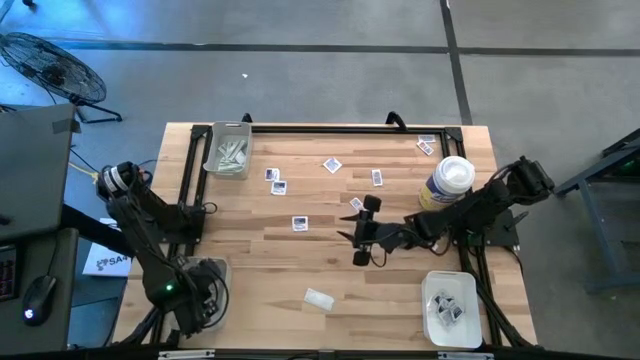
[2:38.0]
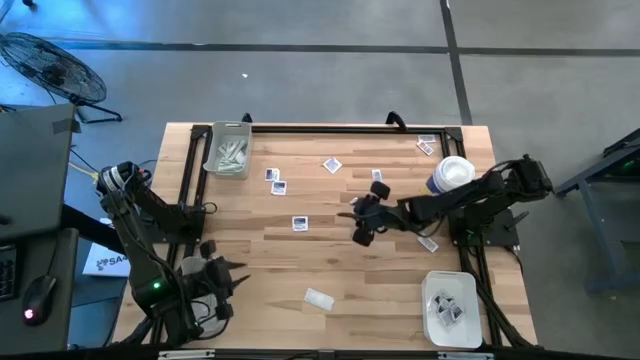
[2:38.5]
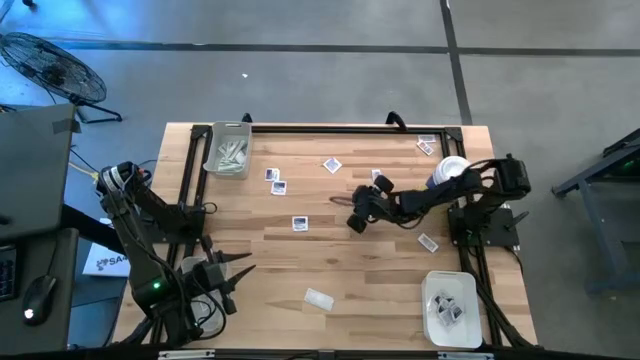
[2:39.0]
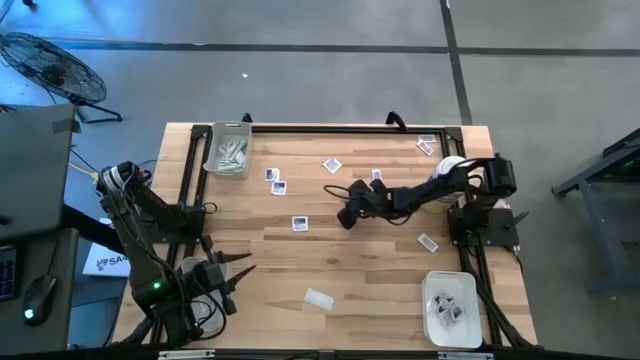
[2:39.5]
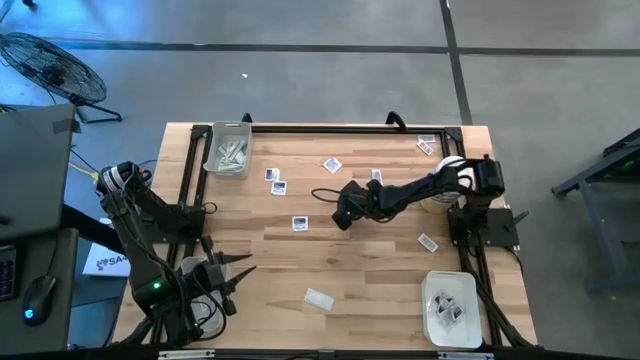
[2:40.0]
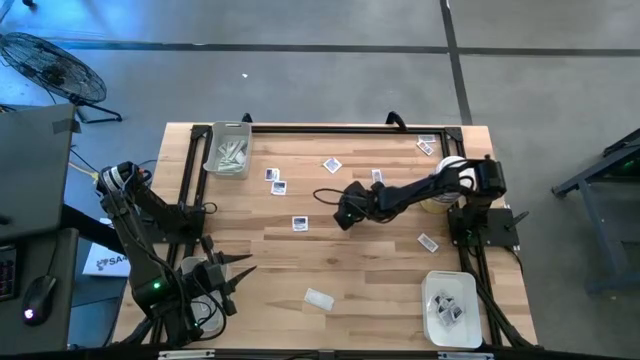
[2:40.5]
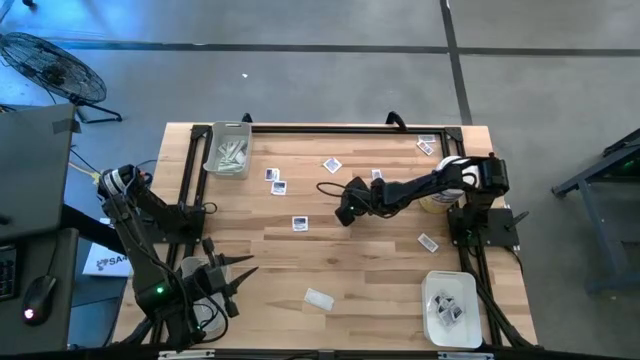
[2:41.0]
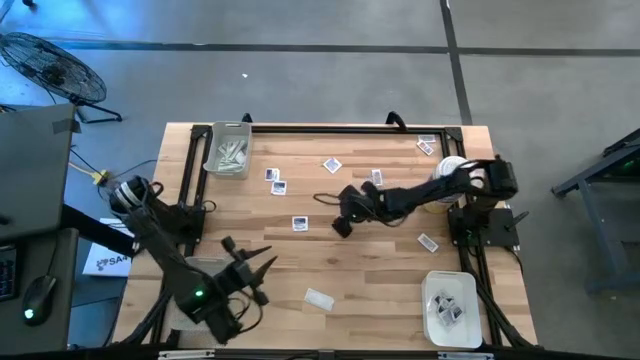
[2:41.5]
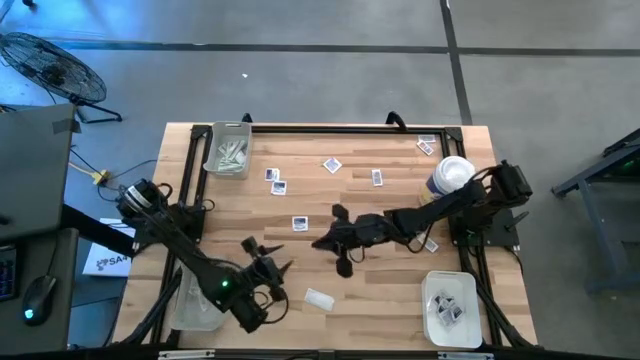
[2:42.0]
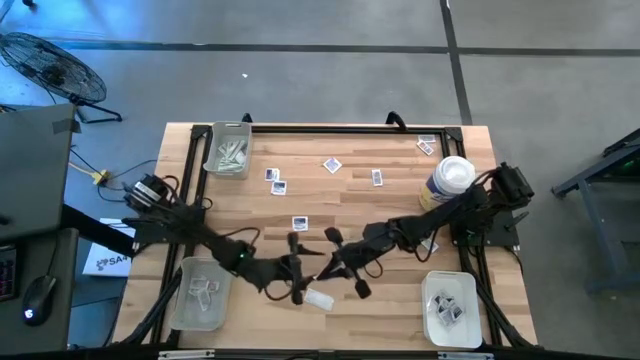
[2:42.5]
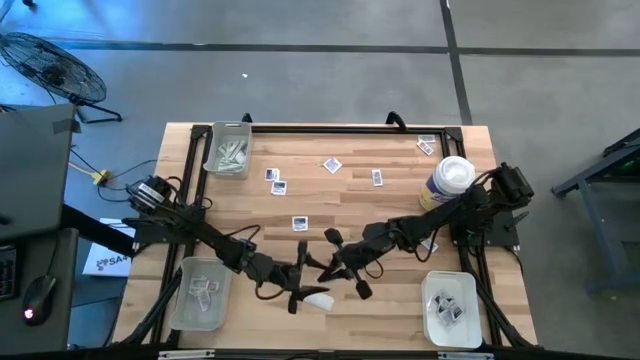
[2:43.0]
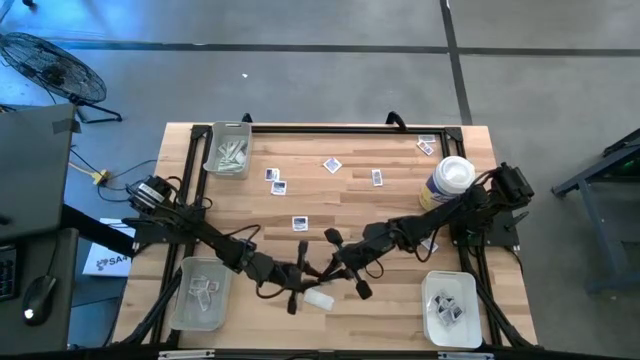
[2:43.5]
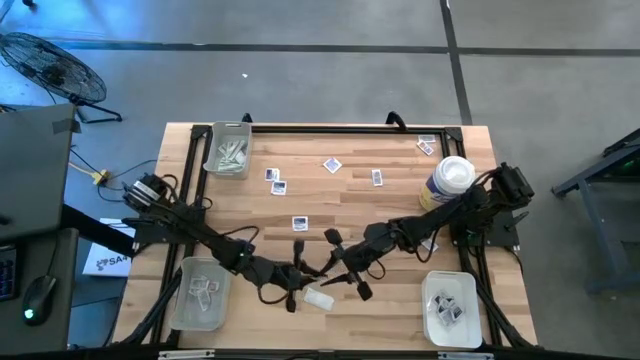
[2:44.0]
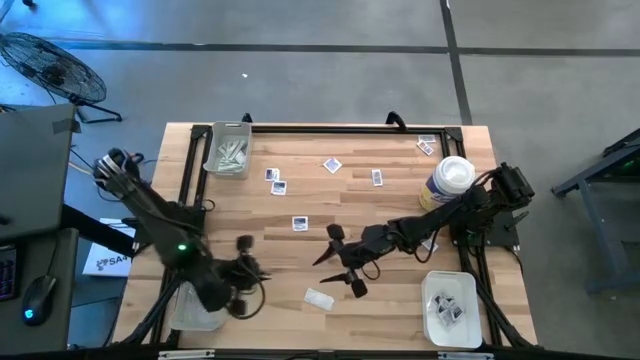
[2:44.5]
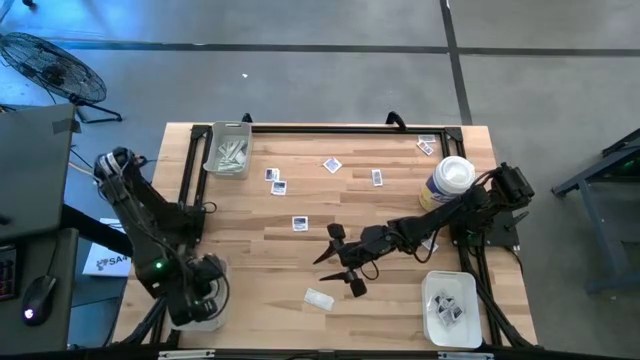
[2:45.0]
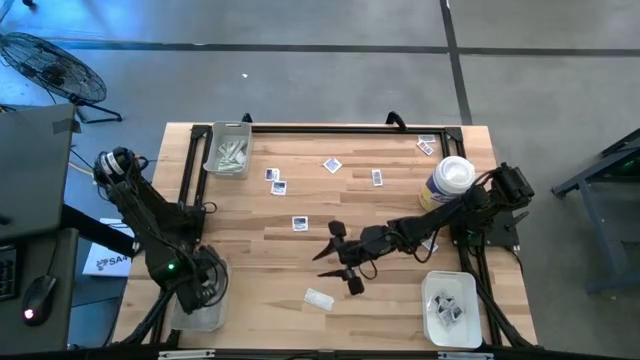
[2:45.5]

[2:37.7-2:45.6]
Task: Pick & Place First Aid Supplies
Put the orange ointment pack into the bottom gray bin

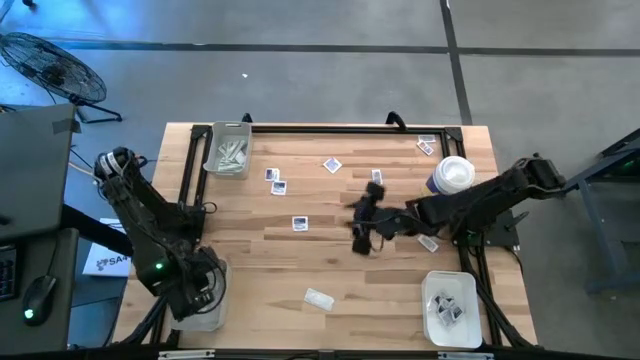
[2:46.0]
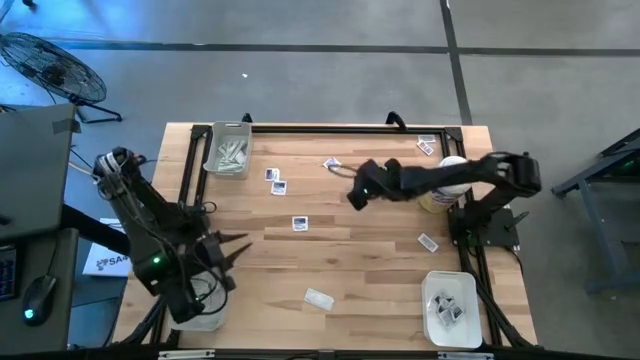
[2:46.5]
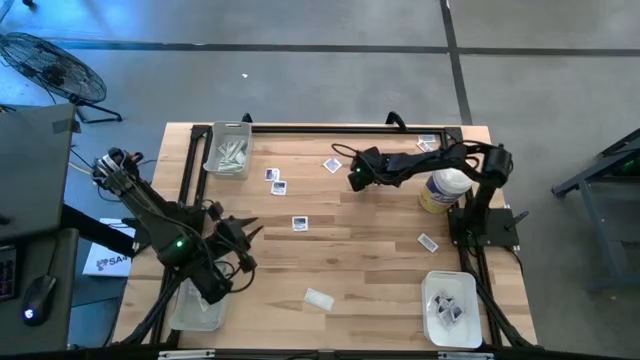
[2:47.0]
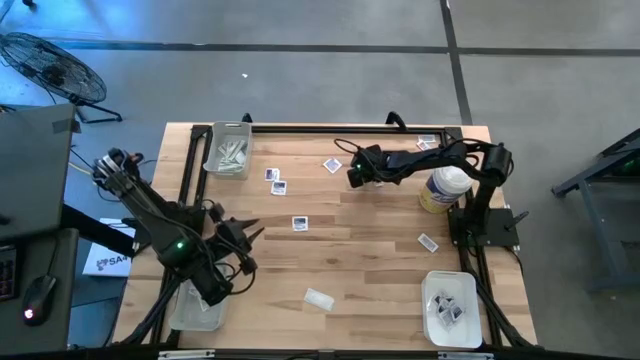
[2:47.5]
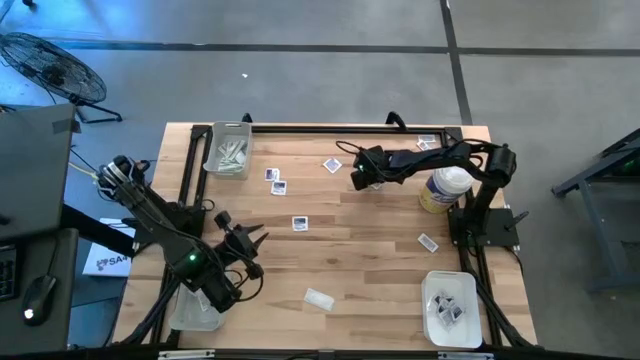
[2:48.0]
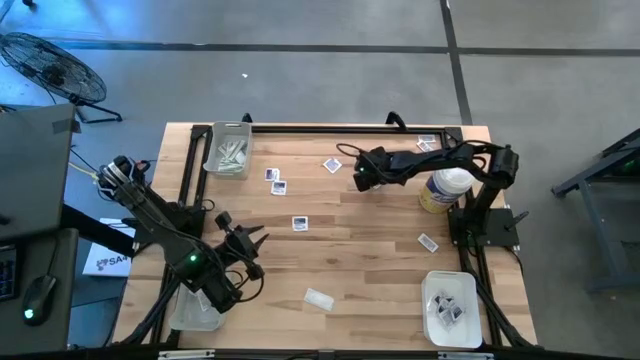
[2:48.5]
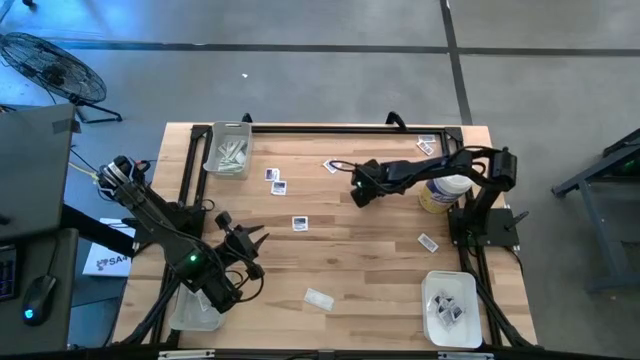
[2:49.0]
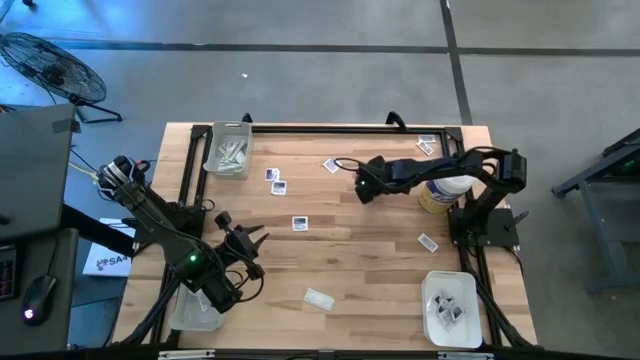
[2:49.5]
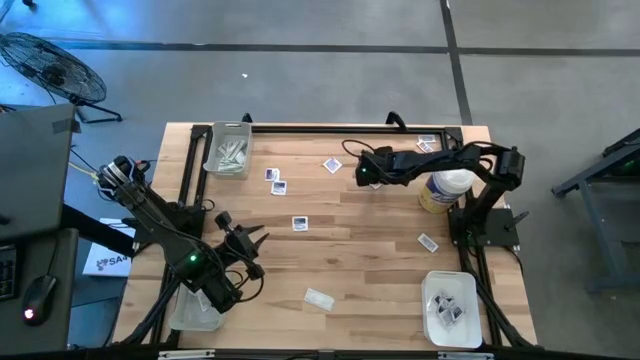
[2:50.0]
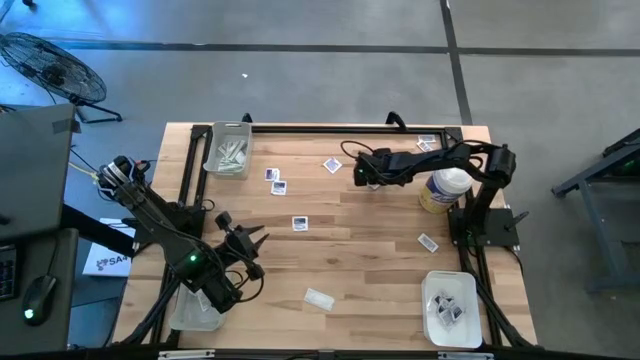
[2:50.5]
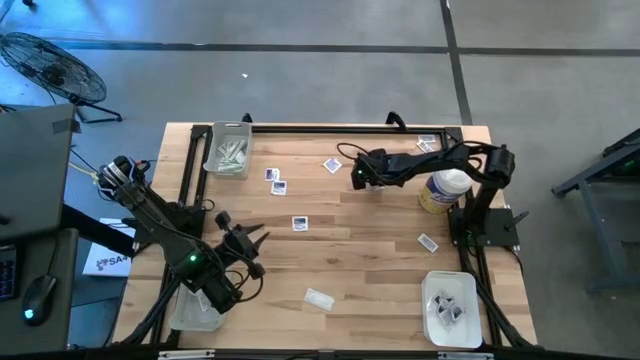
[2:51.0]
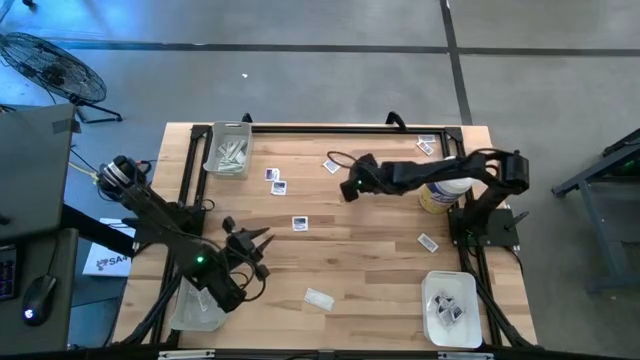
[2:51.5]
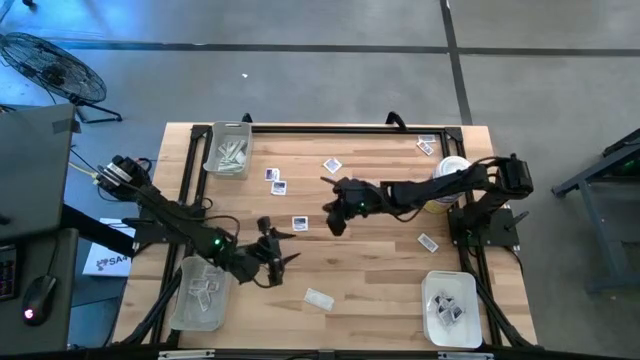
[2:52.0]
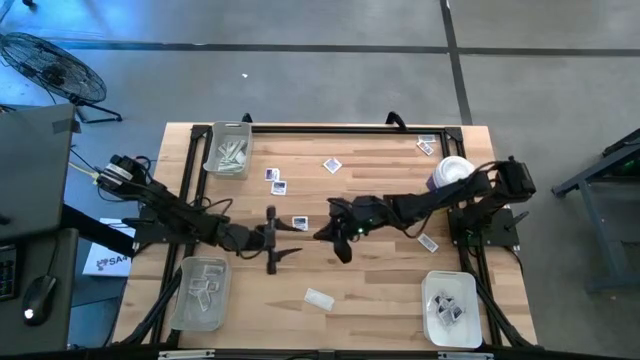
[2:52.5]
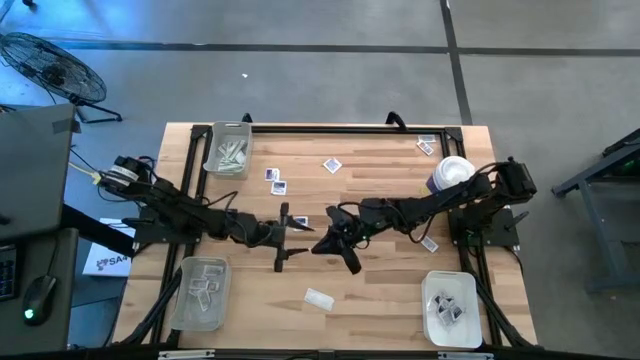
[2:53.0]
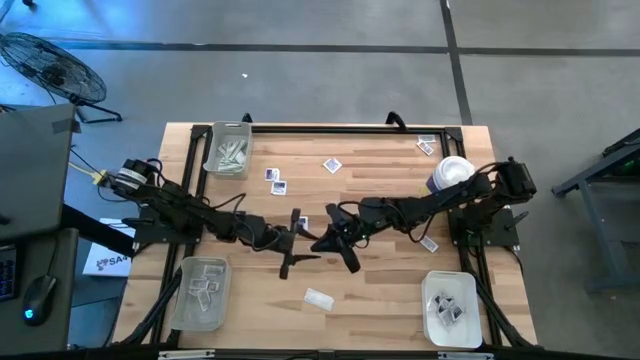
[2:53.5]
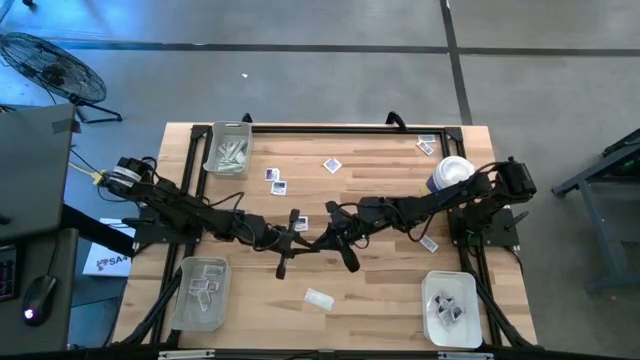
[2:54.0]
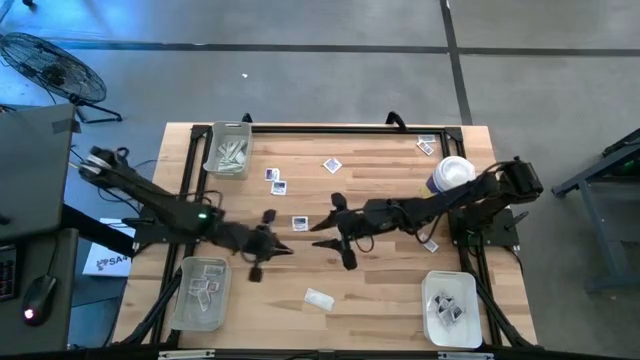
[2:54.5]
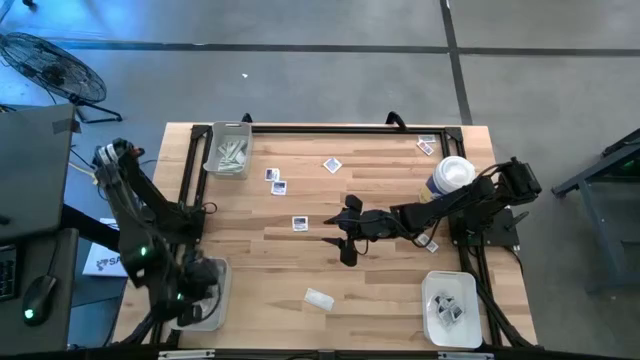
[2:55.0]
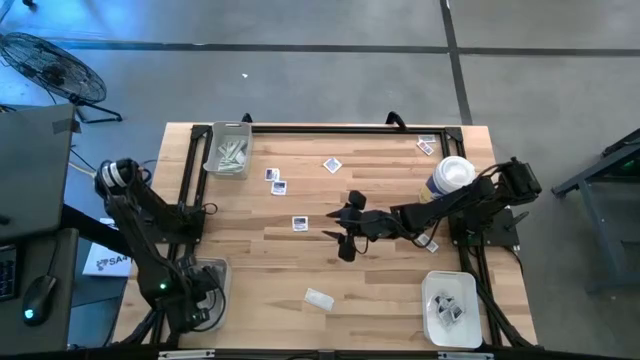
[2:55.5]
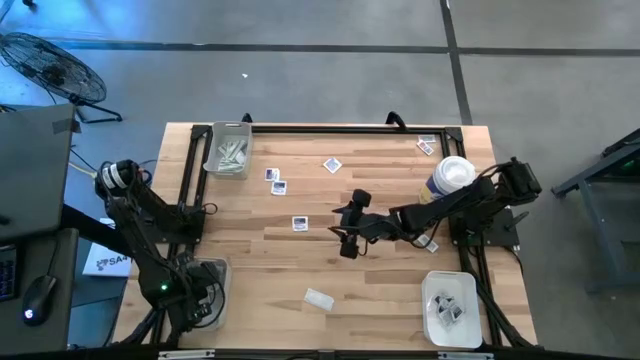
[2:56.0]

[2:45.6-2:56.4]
Put the orange ointment pack into the bottom gray bin

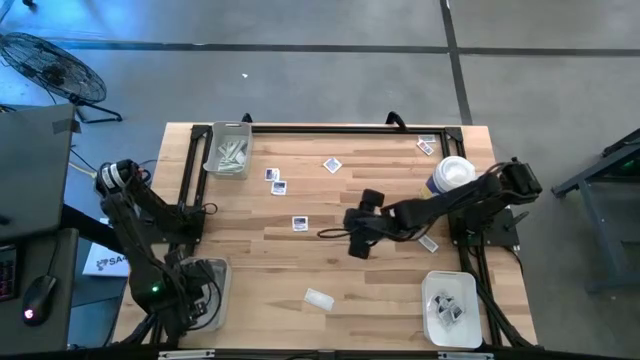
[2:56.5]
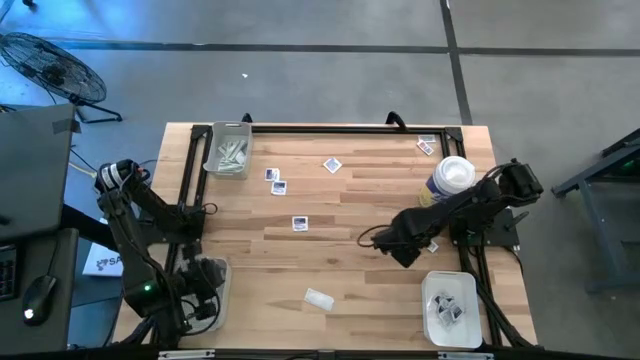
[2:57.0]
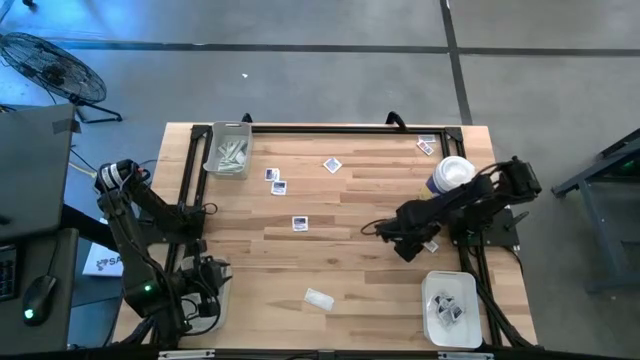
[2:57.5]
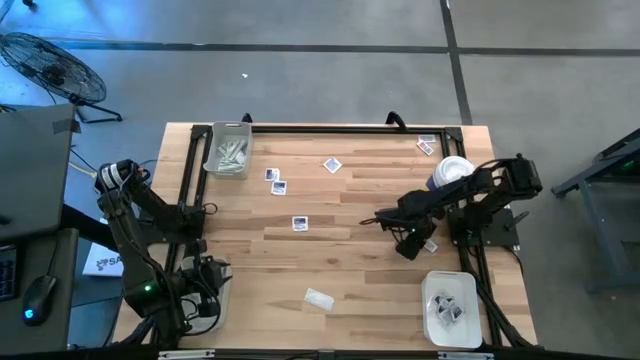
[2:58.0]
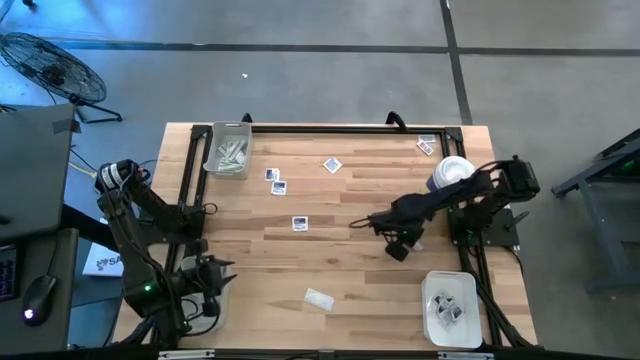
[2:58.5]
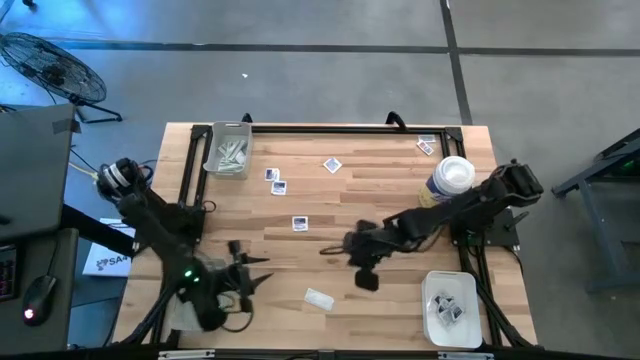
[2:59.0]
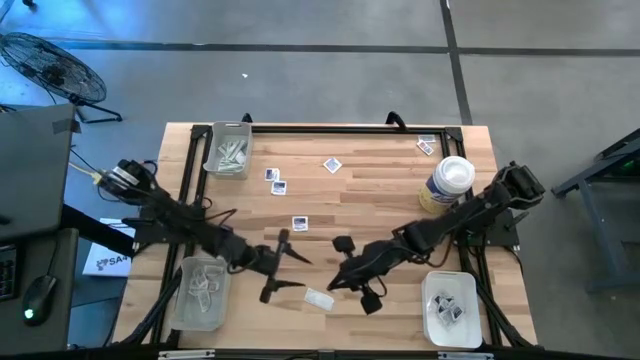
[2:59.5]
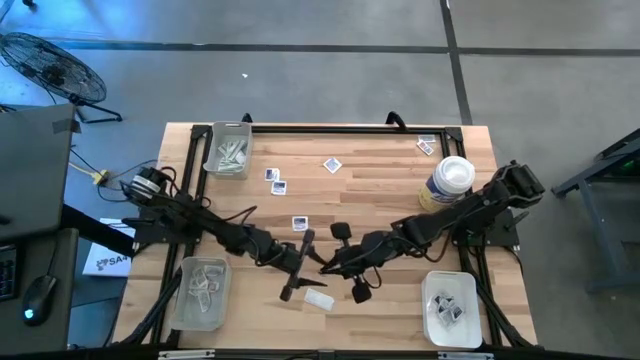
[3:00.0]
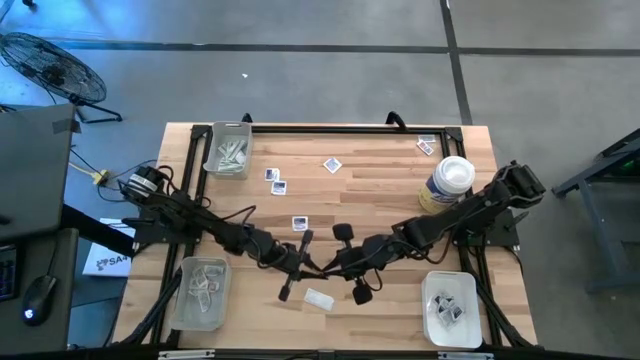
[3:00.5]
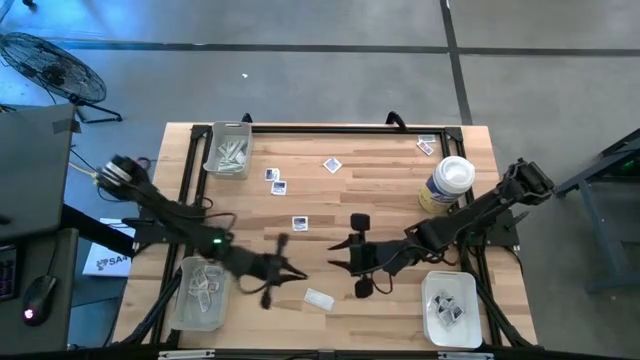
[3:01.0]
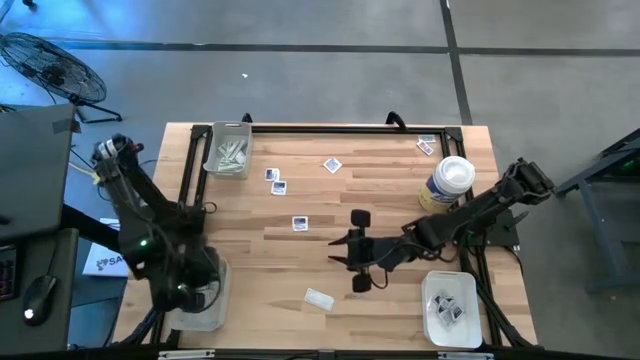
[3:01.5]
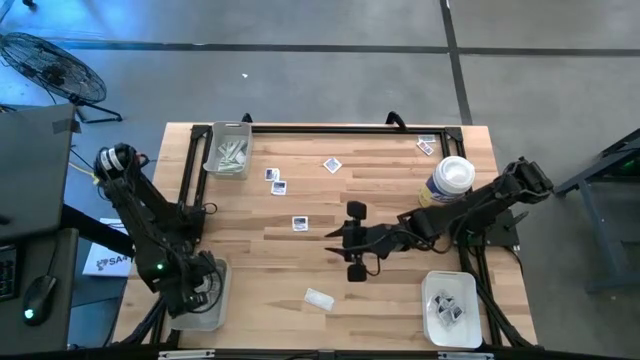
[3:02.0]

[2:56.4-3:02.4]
Put the bottom orange ointment pack into the bottom gray bin
